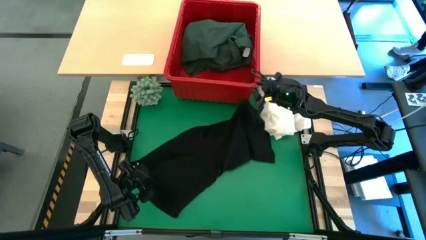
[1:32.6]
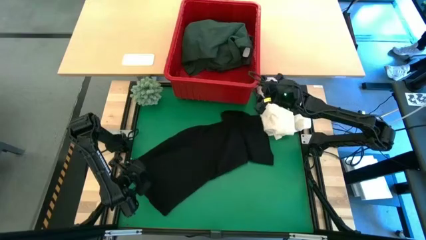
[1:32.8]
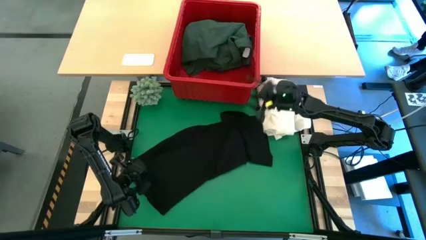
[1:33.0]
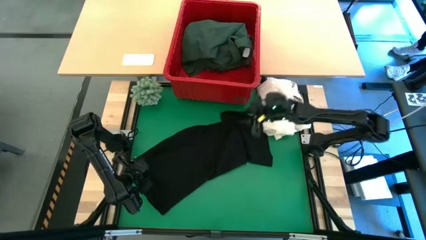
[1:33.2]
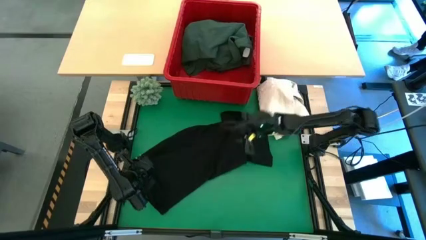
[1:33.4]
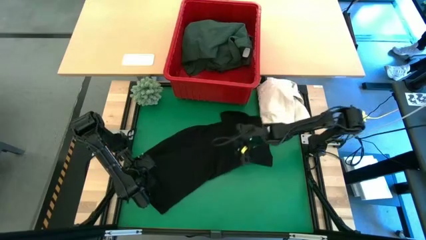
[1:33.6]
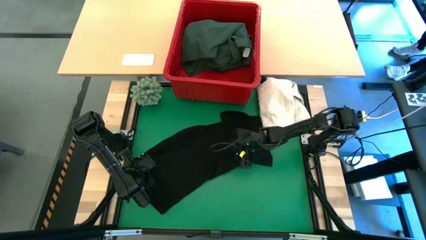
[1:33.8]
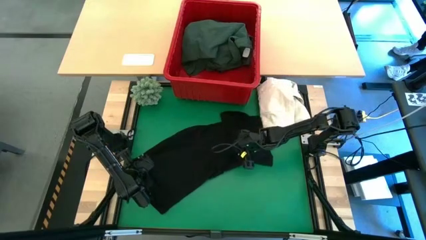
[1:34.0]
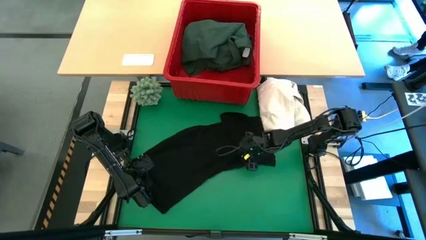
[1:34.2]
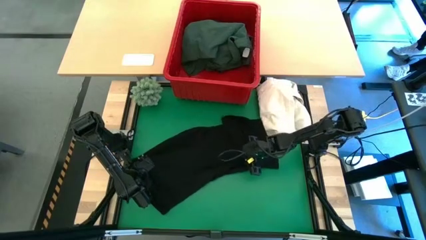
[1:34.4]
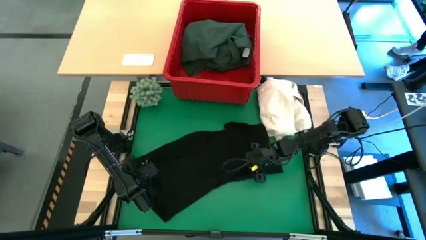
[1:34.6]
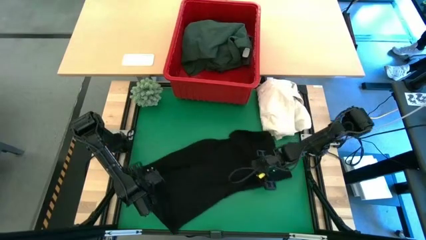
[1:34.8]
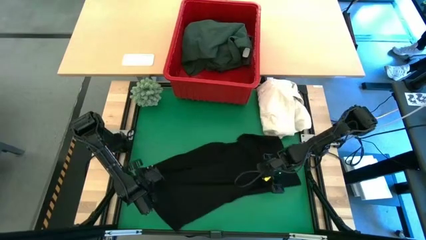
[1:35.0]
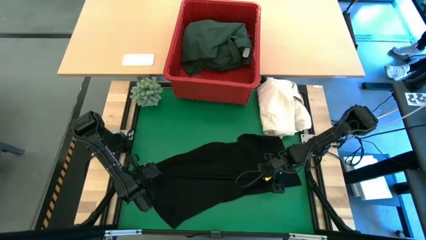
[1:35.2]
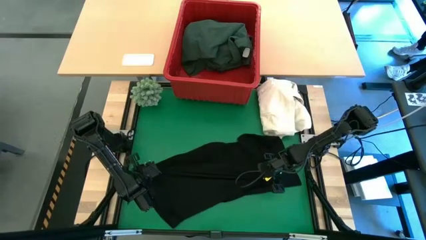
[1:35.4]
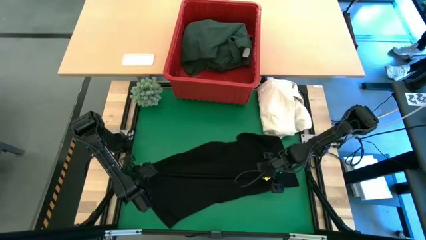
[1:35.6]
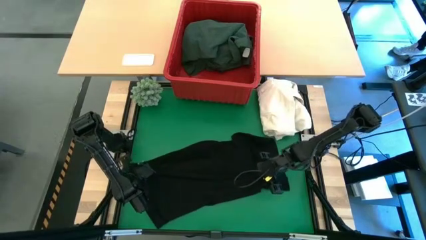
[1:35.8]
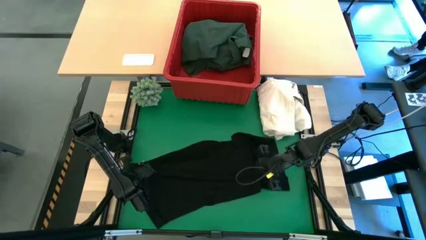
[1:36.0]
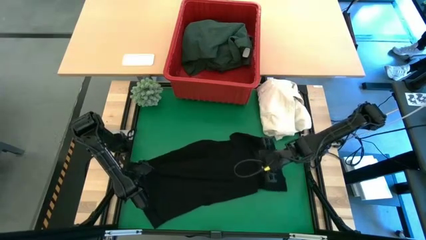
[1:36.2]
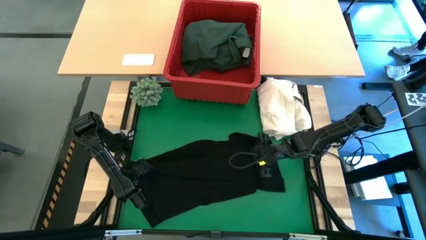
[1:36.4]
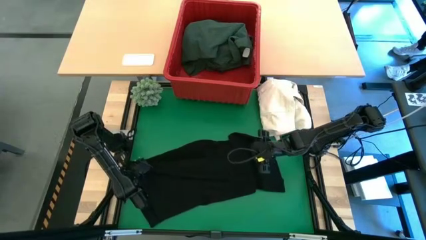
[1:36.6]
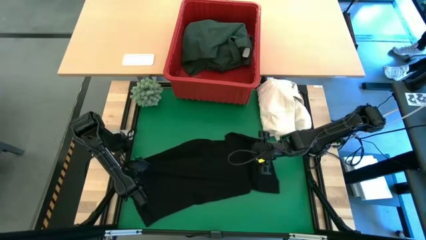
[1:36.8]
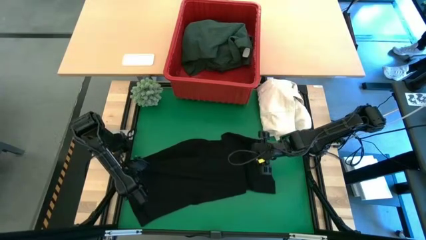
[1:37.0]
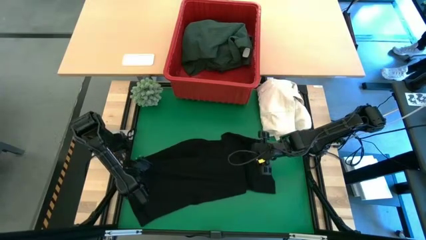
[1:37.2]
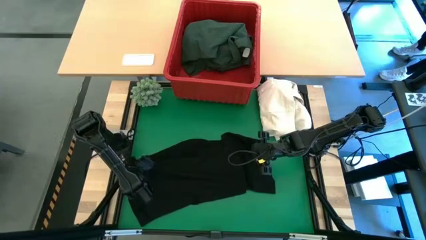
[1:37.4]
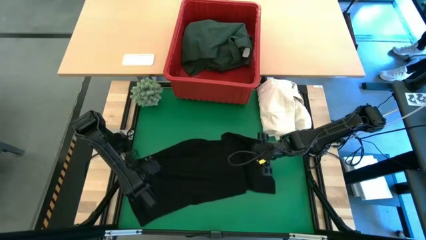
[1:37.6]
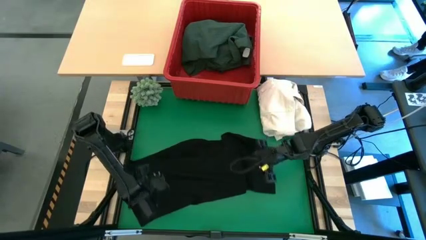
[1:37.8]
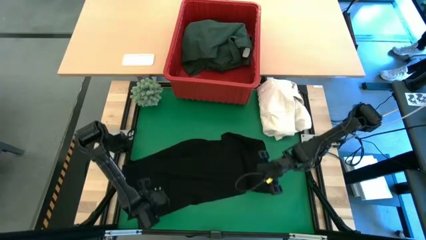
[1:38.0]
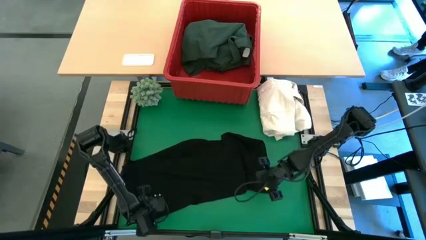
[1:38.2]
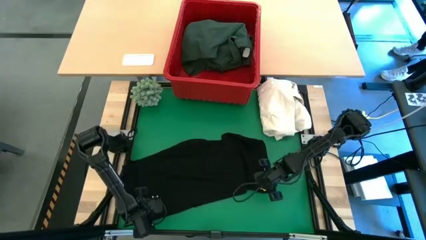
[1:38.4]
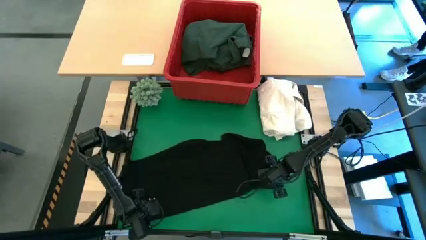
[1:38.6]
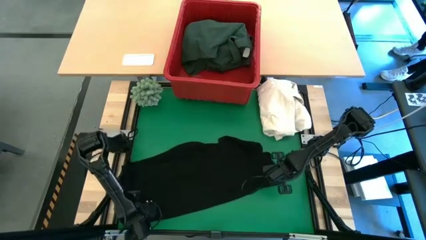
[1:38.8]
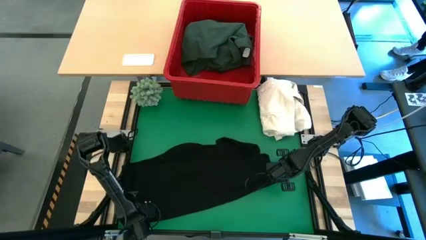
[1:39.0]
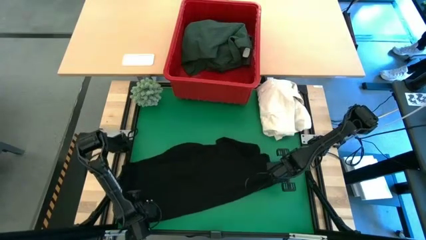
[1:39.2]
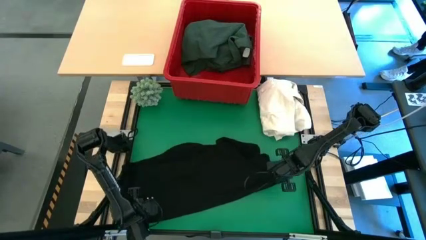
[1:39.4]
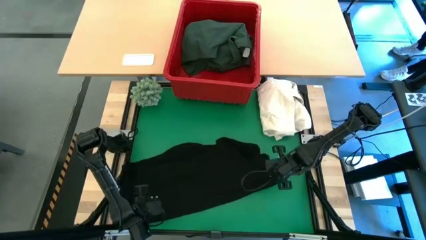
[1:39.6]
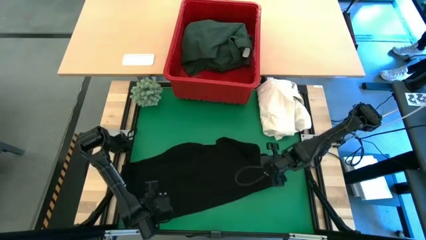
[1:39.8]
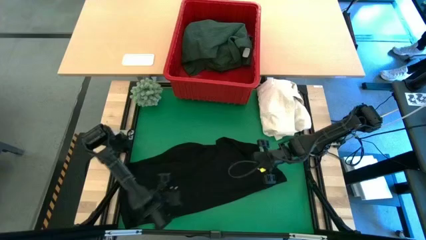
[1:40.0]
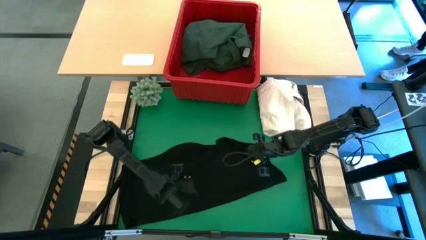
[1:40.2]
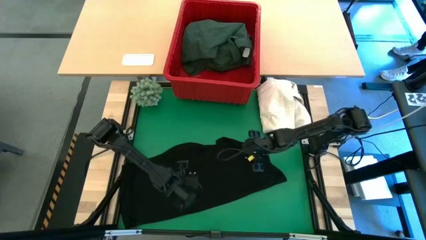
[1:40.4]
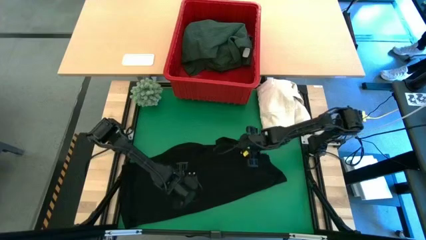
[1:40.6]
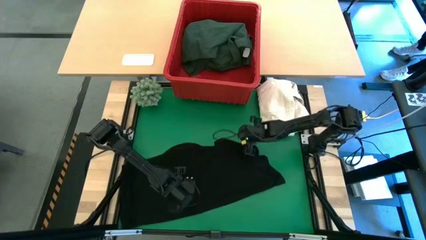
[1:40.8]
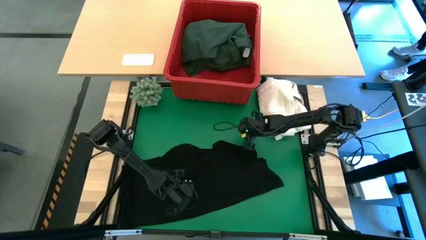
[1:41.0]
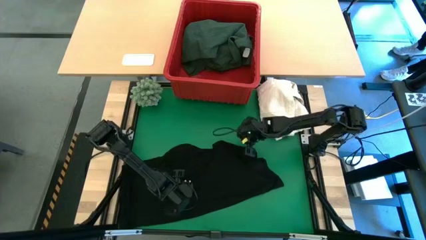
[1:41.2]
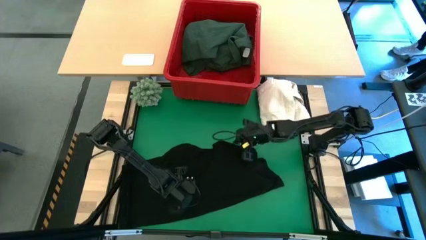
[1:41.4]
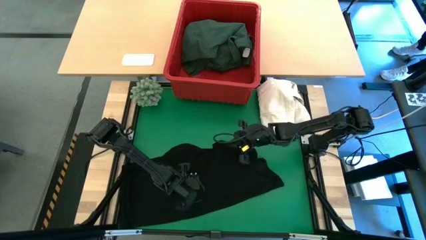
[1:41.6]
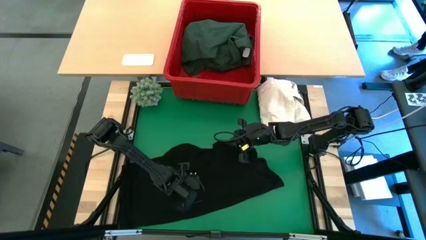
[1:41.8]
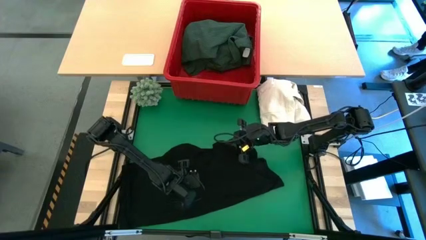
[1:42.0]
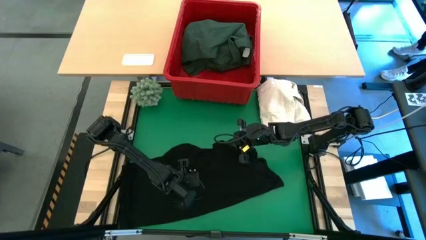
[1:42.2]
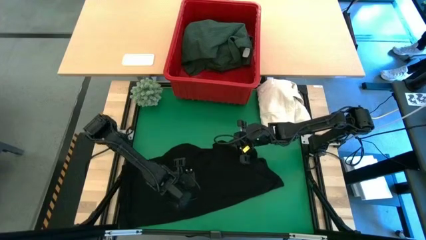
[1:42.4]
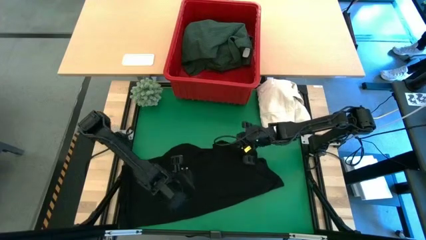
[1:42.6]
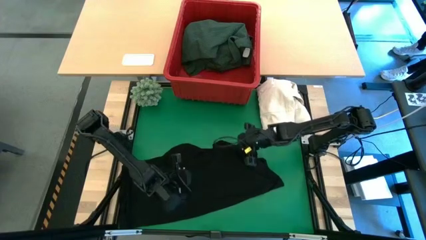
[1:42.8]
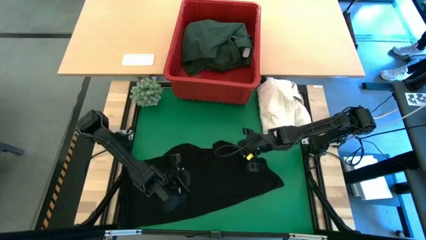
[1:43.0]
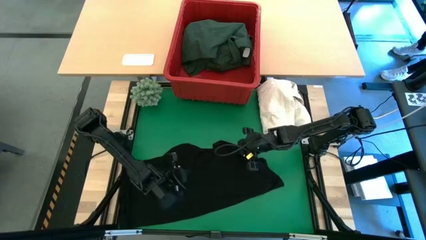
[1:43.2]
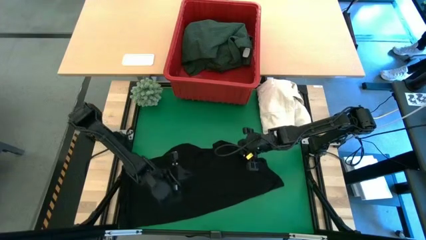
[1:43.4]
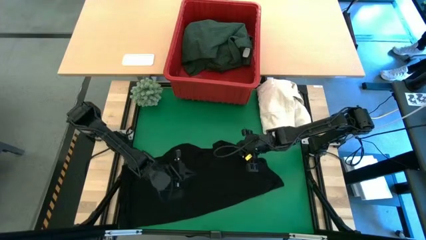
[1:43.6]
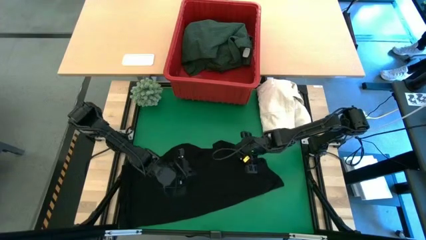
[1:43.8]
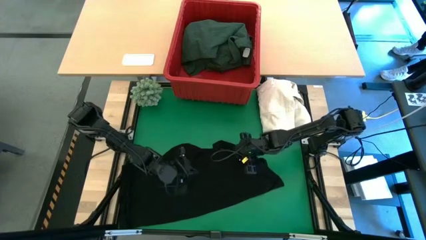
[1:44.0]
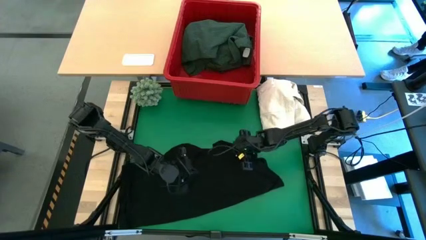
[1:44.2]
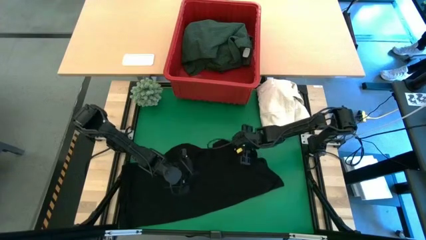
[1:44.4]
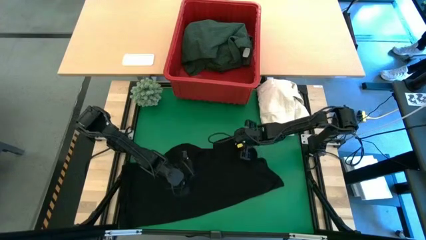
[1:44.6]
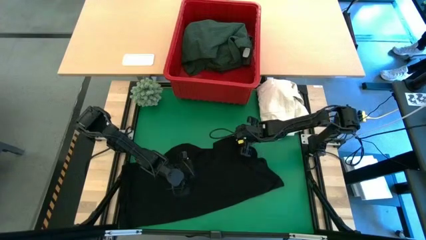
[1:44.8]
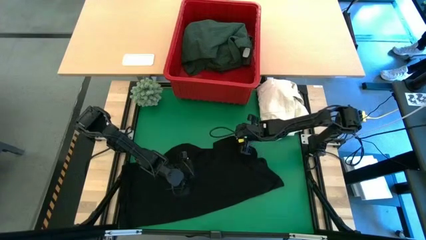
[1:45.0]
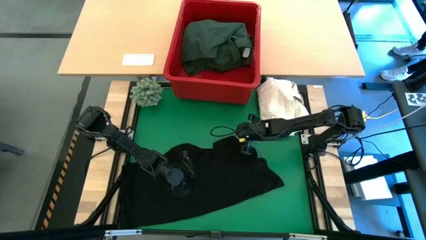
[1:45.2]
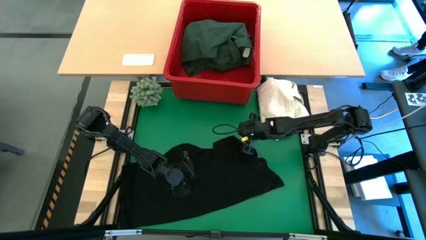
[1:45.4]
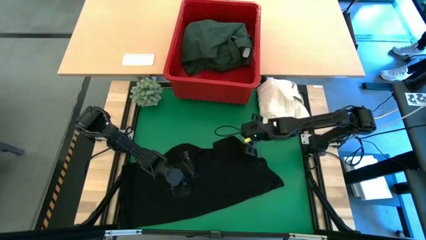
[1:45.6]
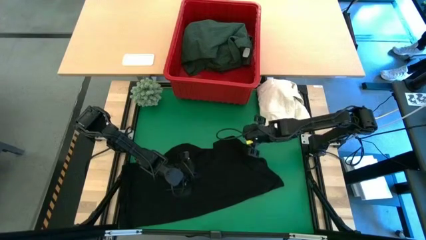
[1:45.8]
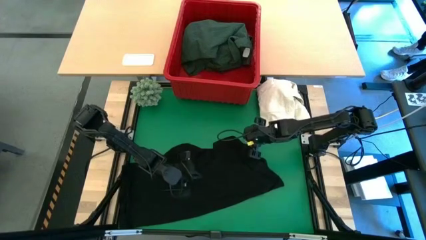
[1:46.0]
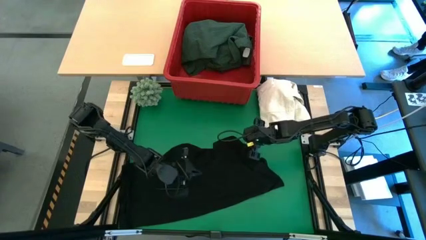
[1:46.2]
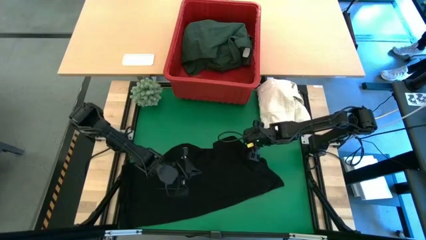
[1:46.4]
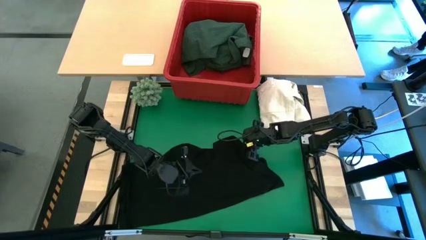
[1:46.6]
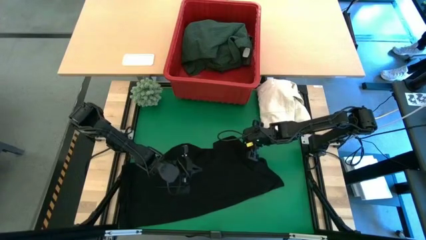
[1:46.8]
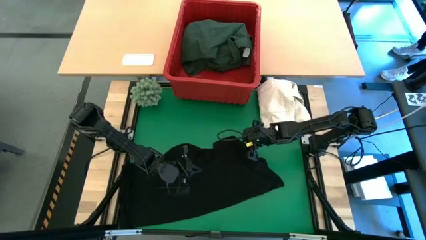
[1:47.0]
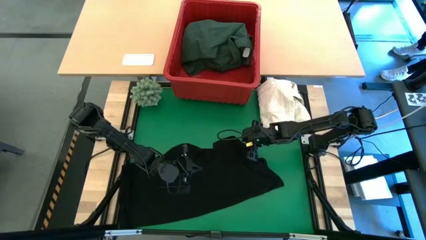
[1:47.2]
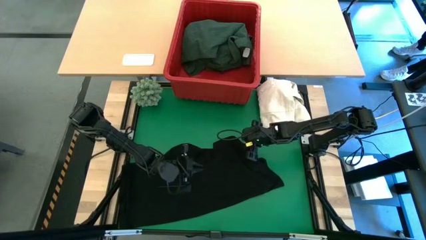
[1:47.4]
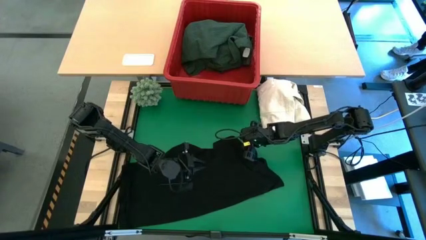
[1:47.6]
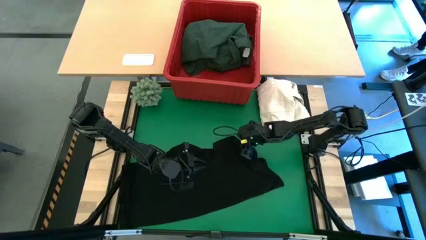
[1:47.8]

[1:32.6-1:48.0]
Task: Fold laundry
Fold the black shirt

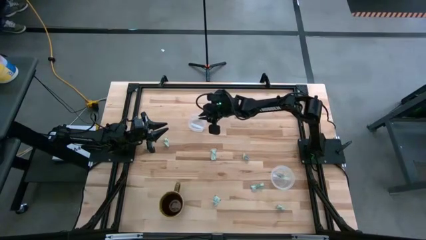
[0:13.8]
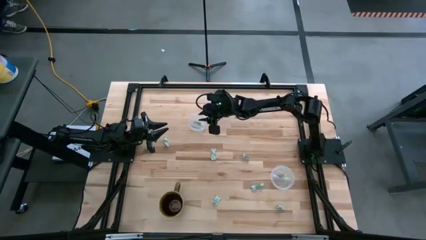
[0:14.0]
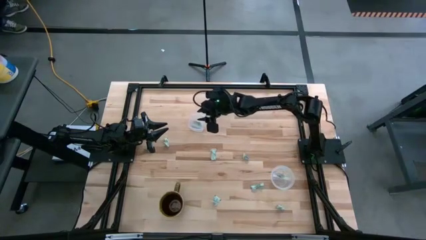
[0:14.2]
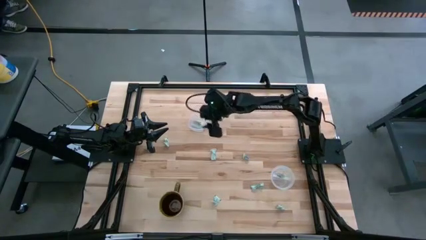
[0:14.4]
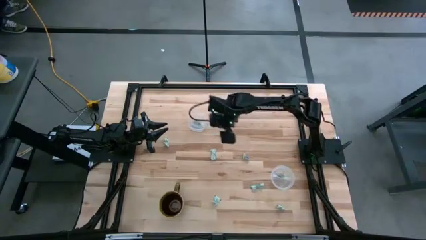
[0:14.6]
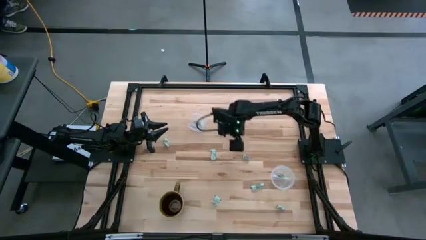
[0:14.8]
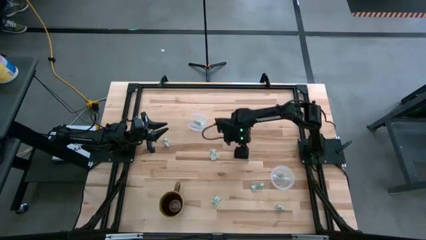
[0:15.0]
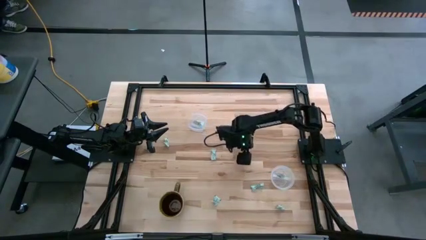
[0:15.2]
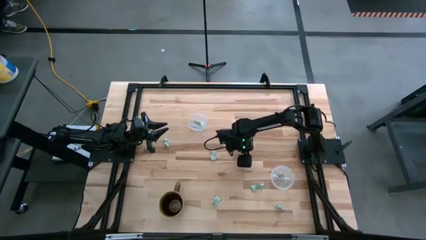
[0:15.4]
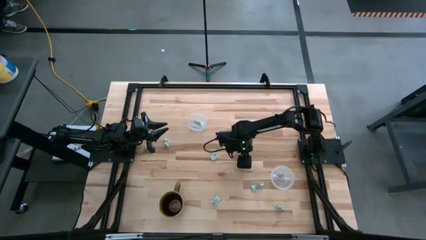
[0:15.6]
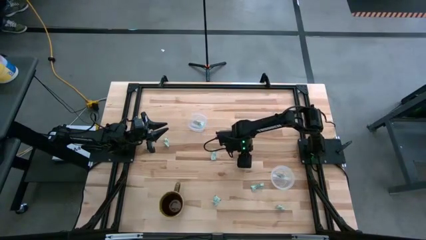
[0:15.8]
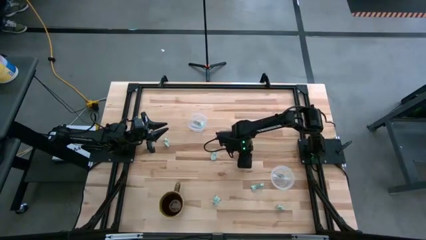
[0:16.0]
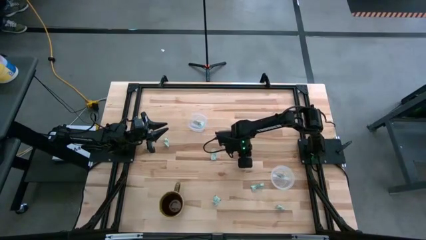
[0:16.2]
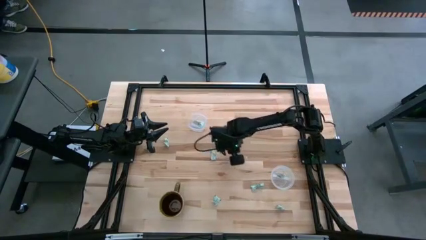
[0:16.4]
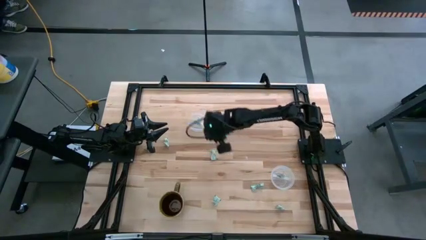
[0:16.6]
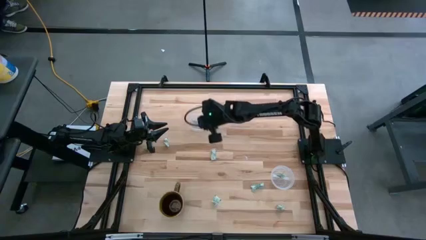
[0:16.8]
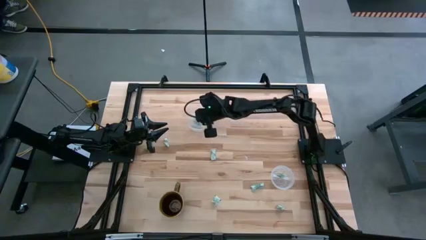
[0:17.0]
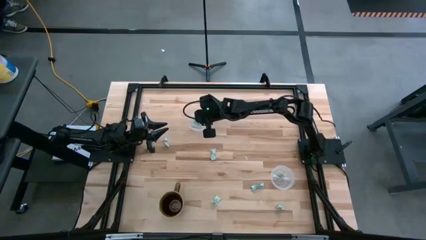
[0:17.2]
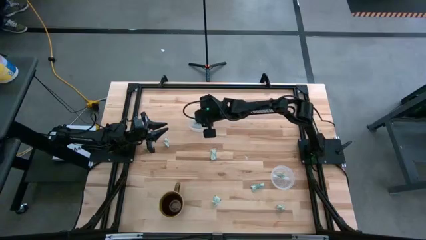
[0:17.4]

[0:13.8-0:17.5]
Task: Pick and place items into bin
Put the white stevia packet into the top transparent bin
